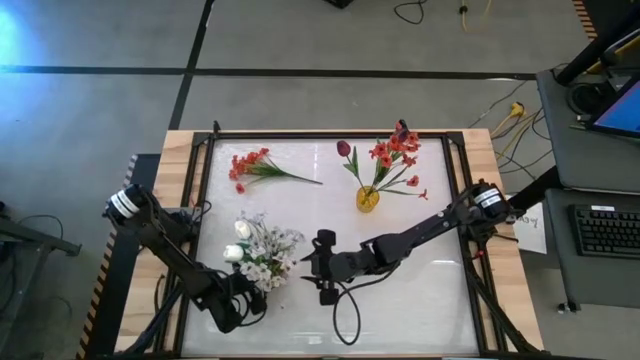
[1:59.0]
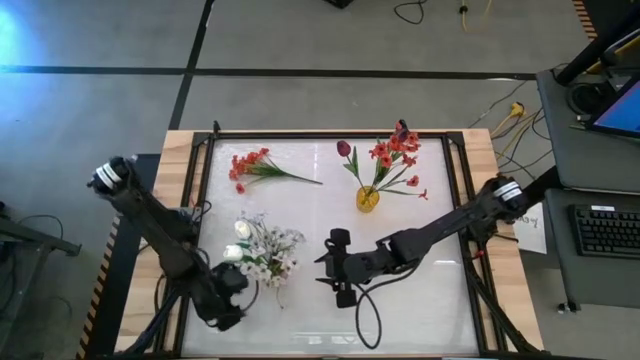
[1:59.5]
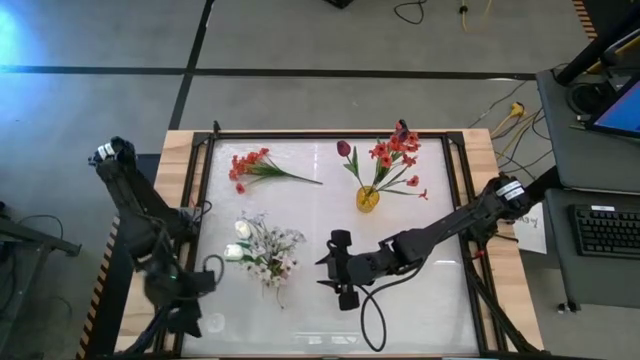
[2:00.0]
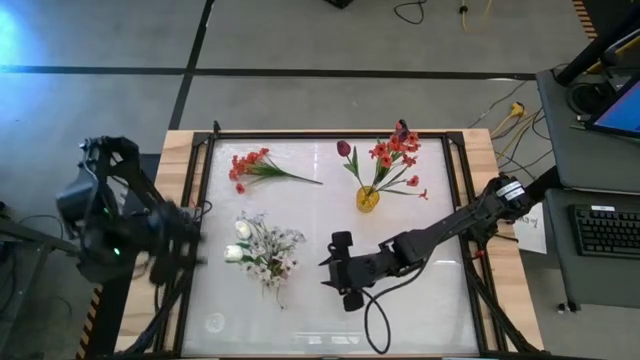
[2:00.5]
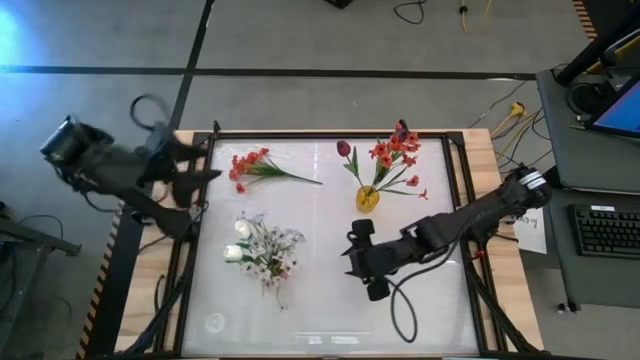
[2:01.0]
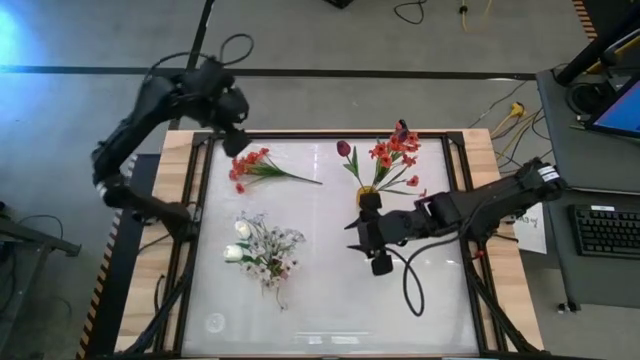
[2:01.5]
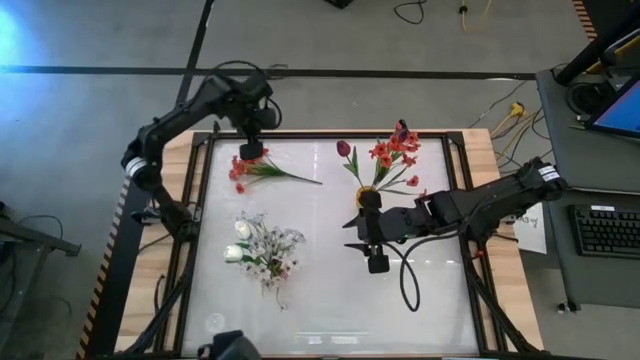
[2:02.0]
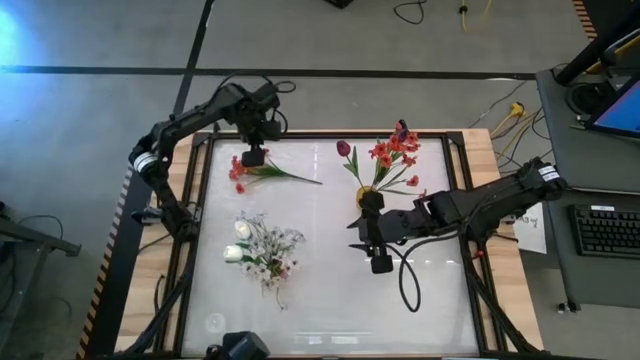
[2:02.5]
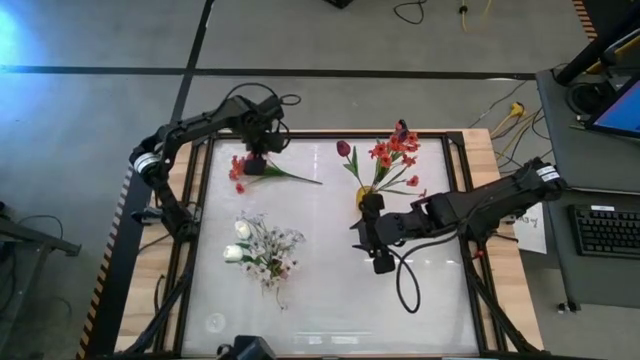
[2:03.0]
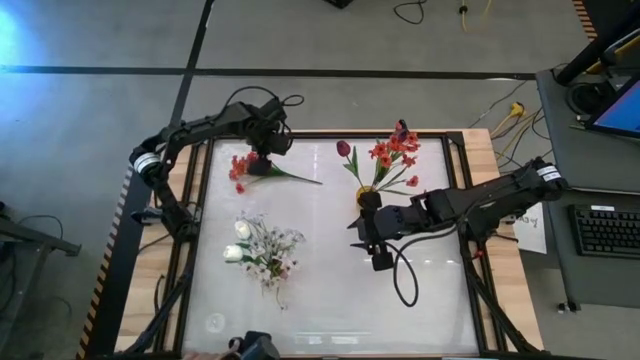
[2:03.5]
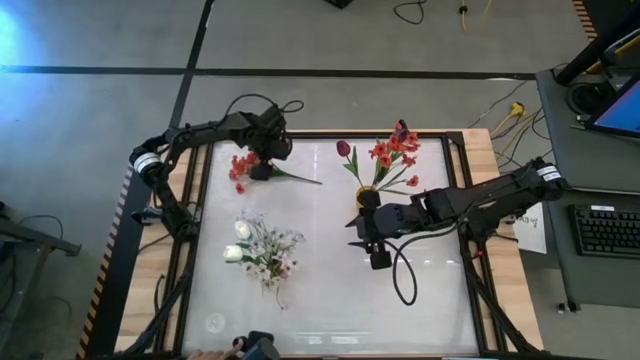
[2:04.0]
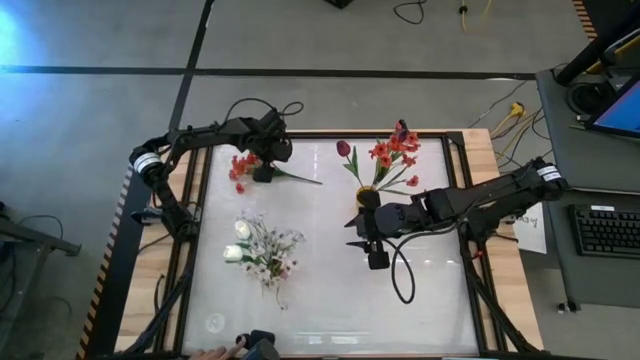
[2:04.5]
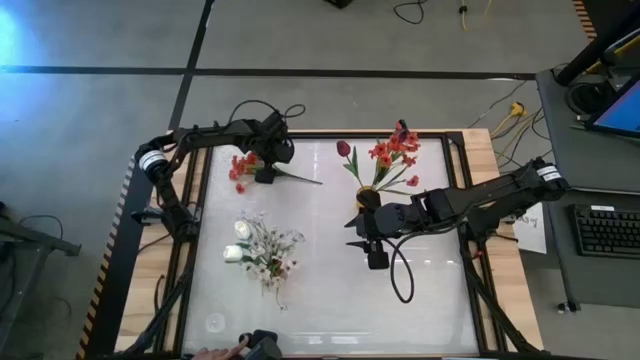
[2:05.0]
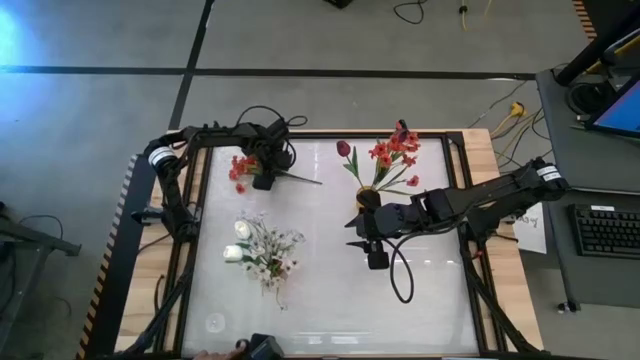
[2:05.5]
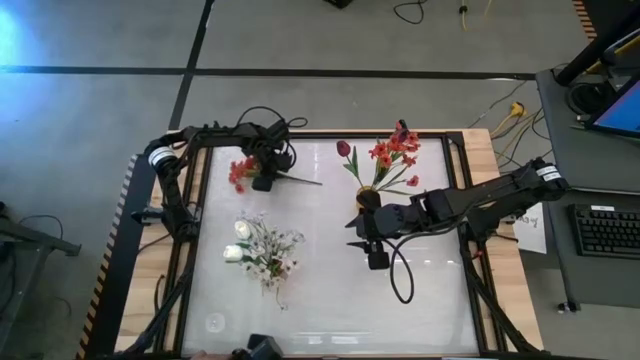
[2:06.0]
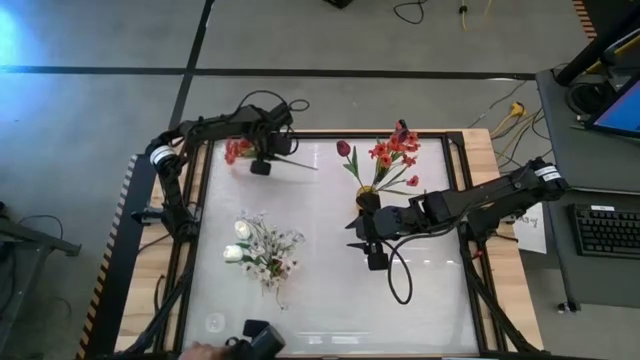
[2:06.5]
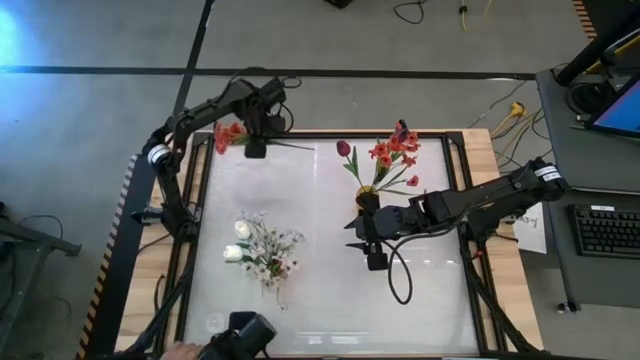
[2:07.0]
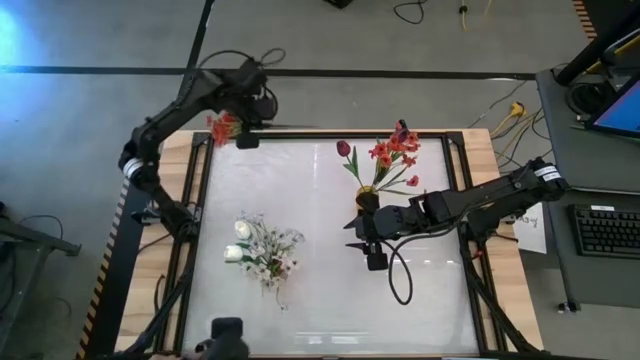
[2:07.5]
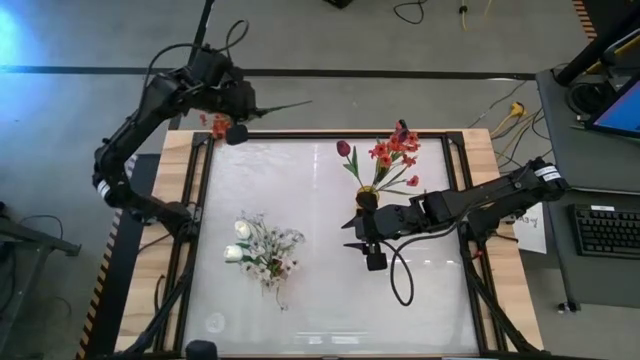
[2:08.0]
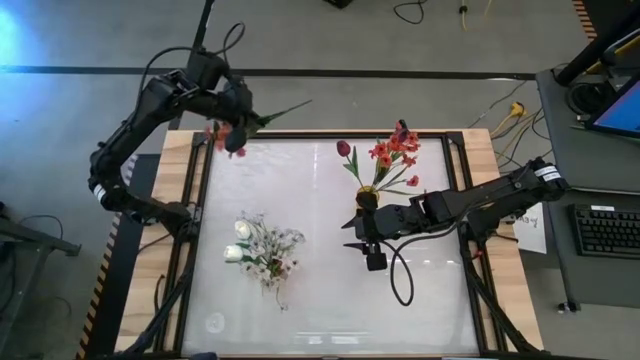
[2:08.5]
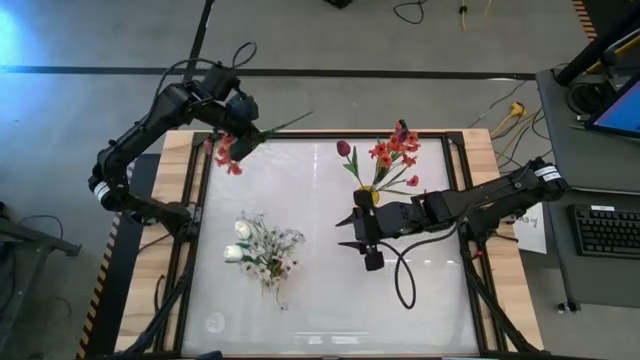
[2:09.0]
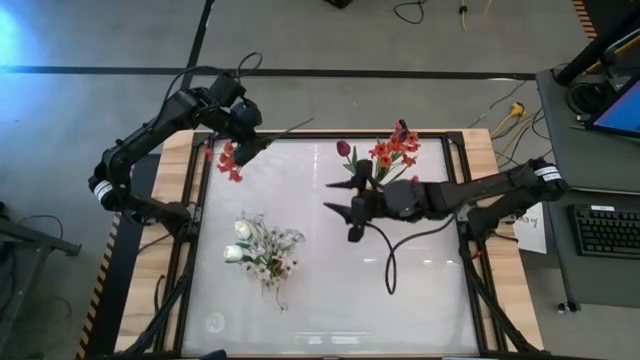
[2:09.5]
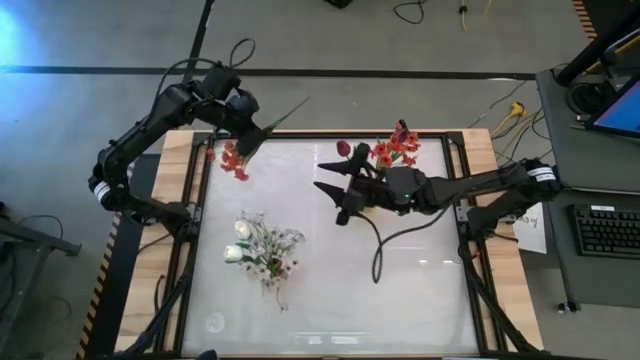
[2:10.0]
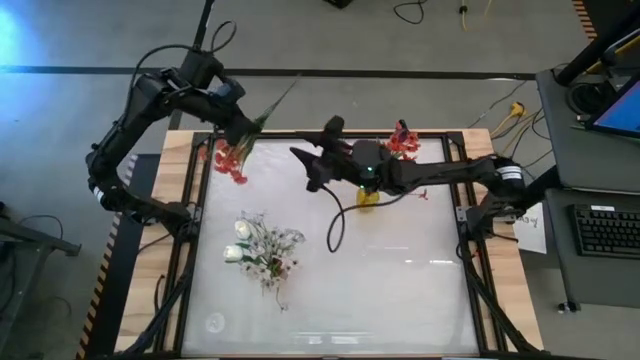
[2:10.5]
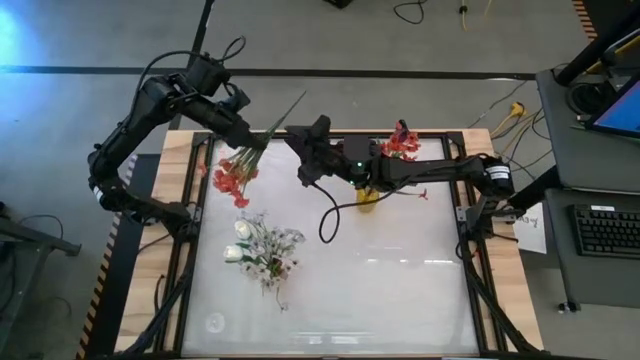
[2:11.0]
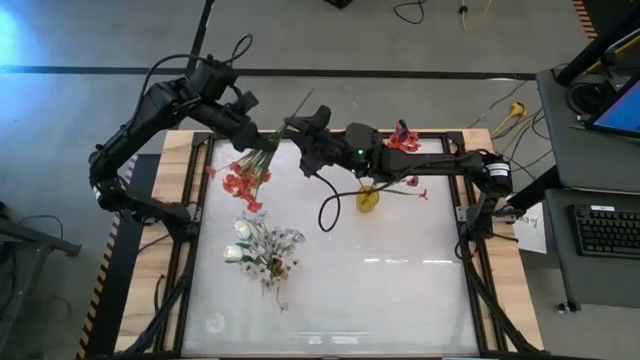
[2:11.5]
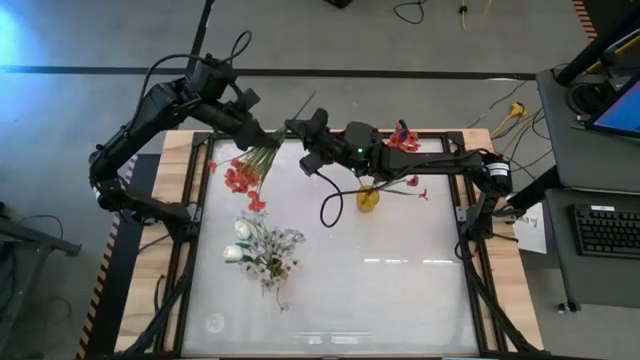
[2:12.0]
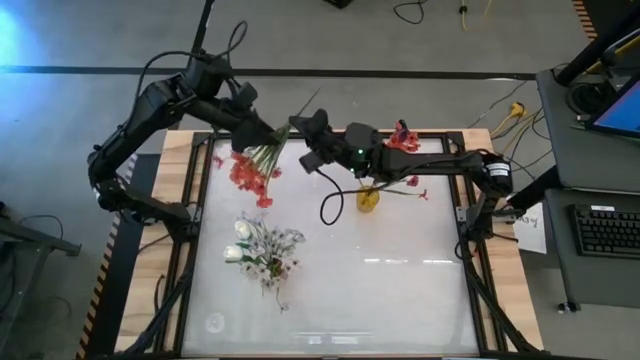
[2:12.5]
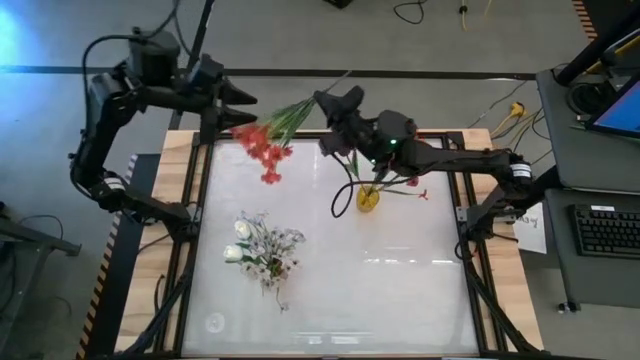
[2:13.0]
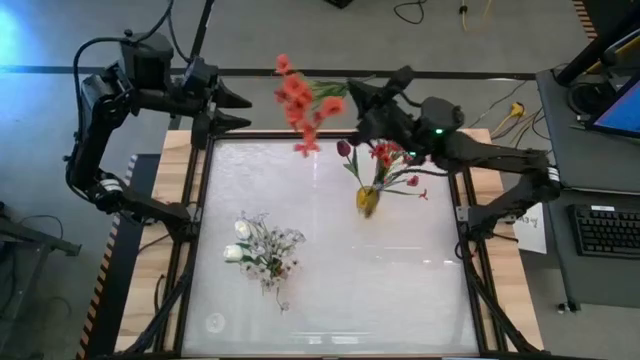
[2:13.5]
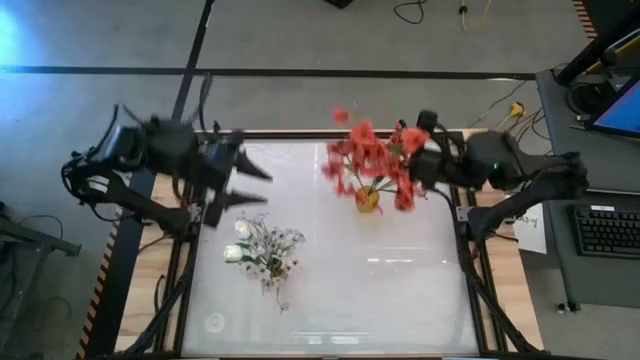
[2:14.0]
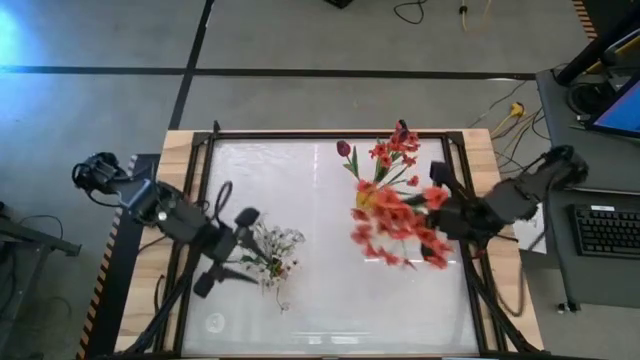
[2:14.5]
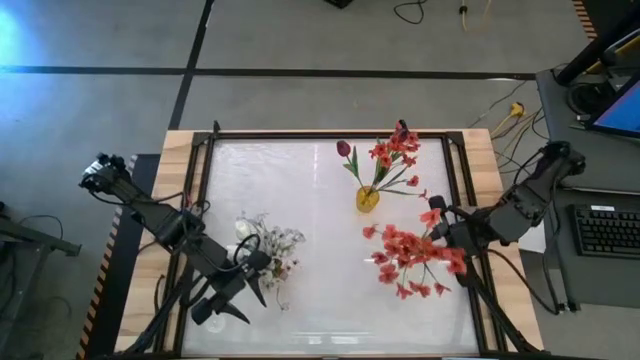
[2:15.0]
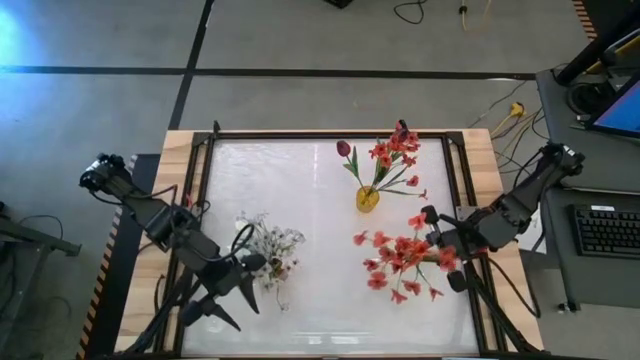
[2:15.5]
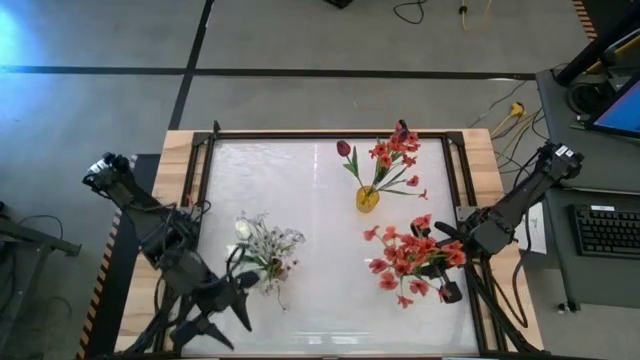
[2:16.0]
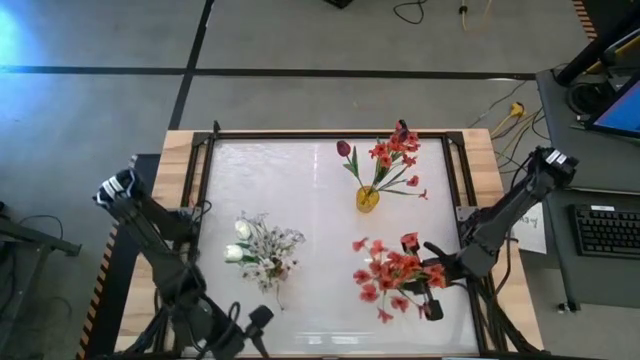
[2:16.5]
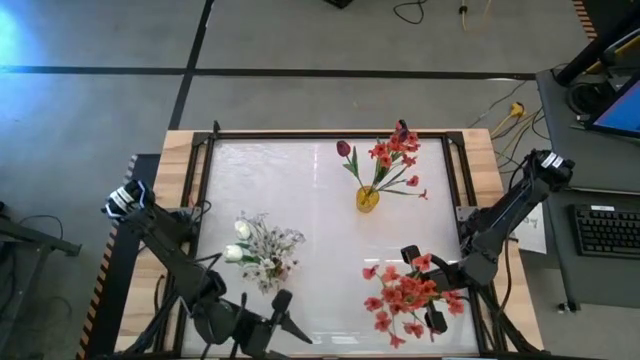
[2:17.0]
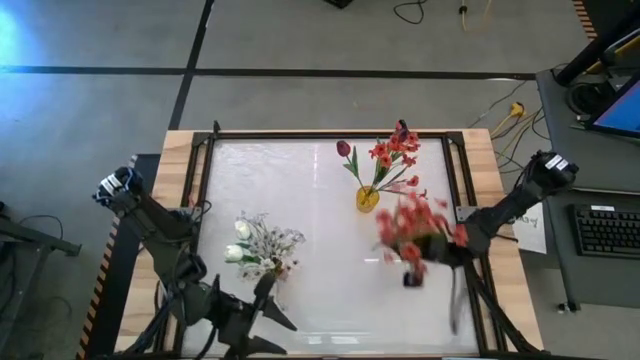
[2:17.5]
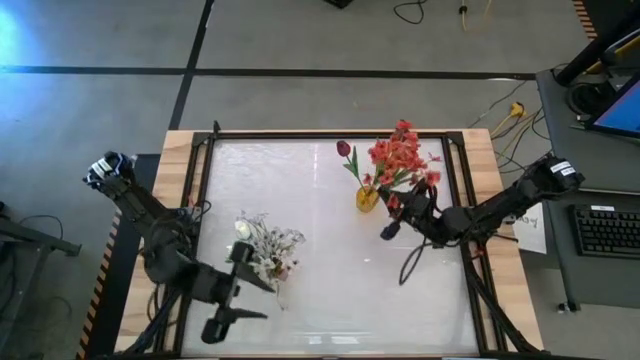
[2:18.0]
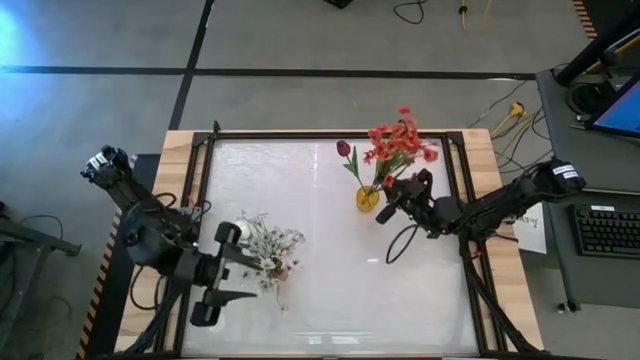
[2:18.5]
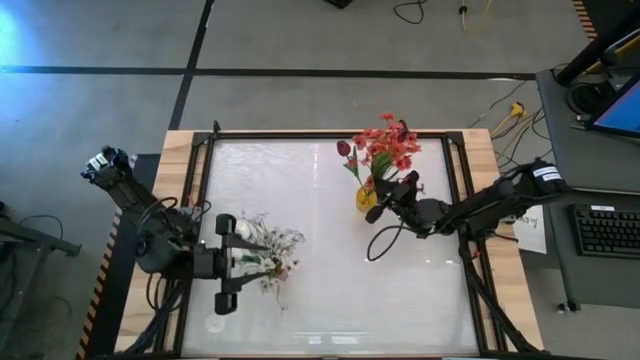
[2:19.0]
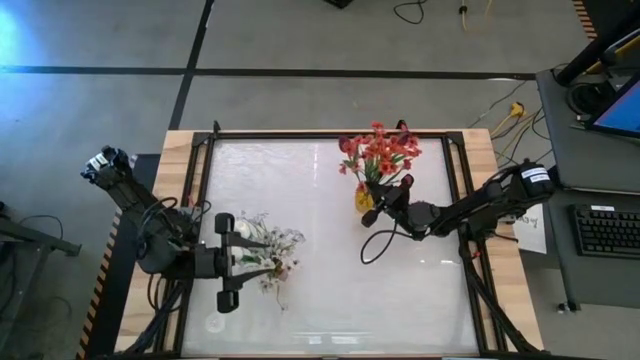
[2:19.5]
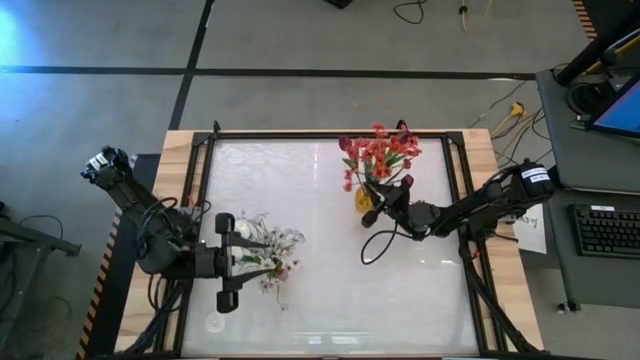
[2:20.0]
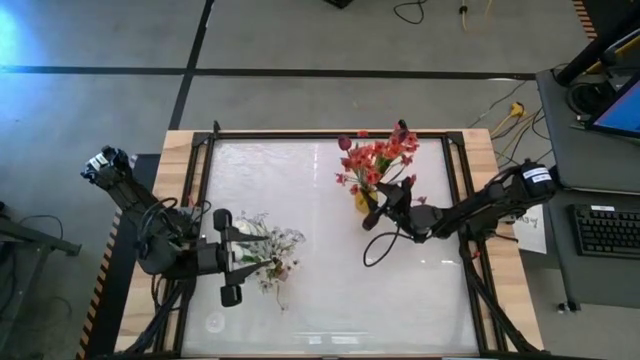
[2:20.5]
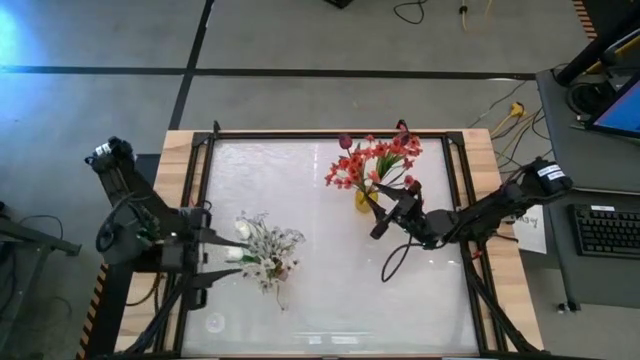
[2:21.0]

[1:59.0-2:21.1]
Task: Sort flowers into vase by color
Put the orange flowers into the yellow vase
